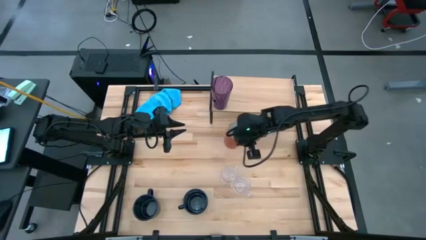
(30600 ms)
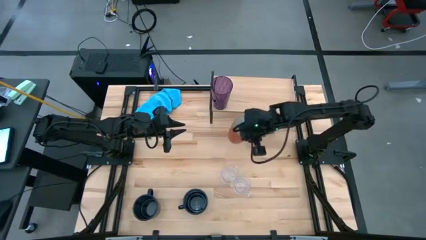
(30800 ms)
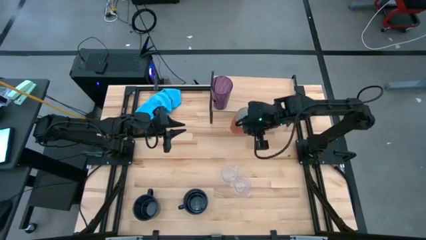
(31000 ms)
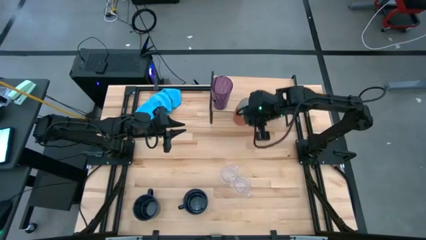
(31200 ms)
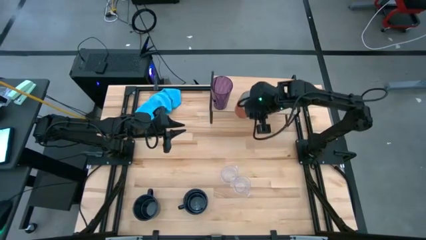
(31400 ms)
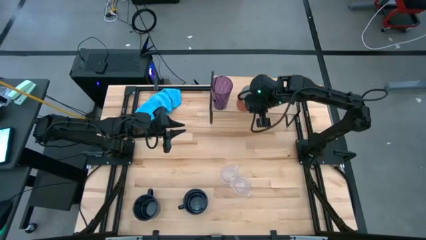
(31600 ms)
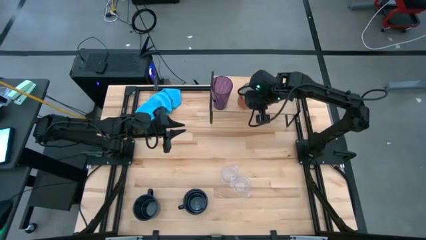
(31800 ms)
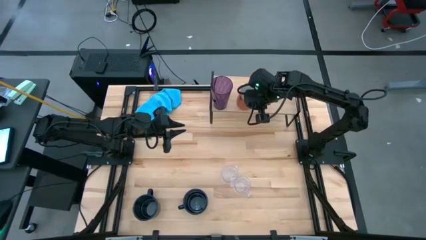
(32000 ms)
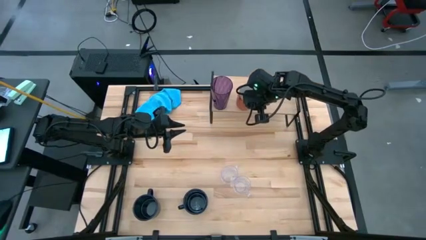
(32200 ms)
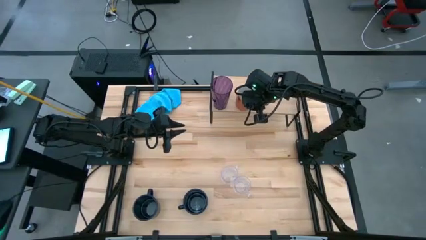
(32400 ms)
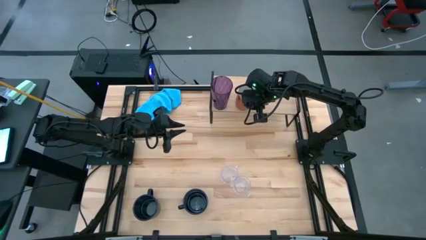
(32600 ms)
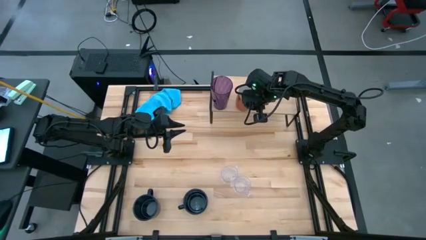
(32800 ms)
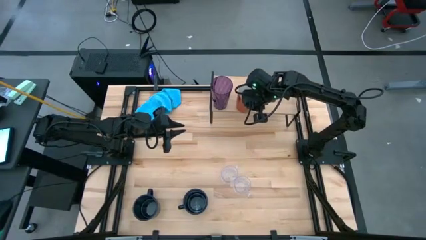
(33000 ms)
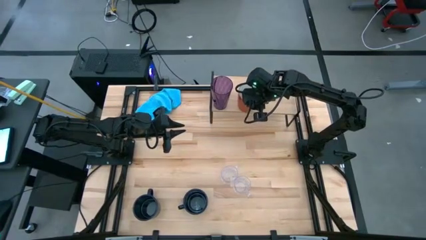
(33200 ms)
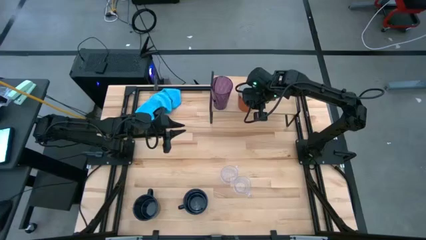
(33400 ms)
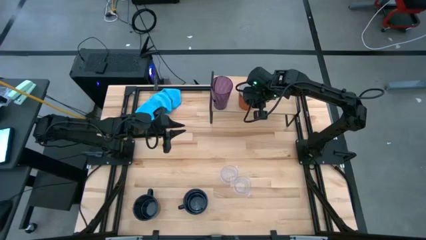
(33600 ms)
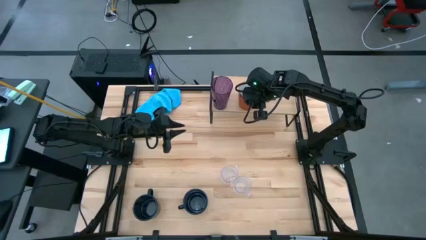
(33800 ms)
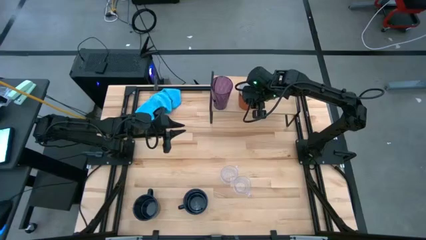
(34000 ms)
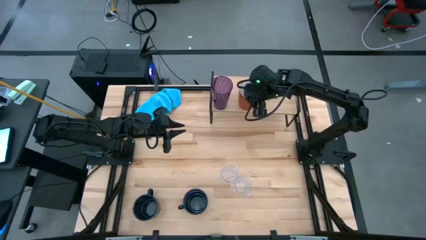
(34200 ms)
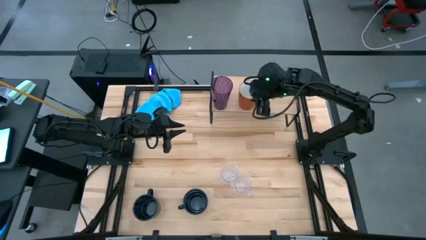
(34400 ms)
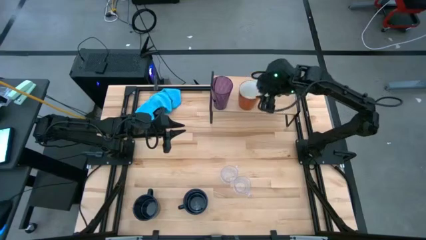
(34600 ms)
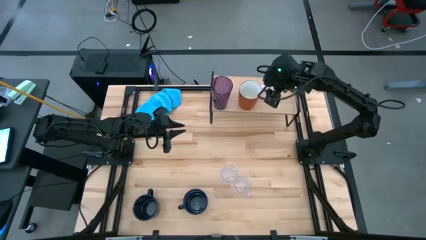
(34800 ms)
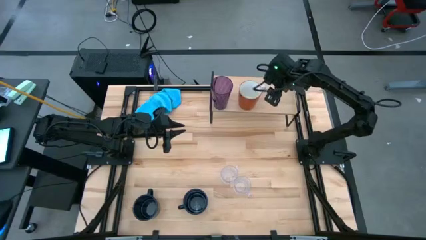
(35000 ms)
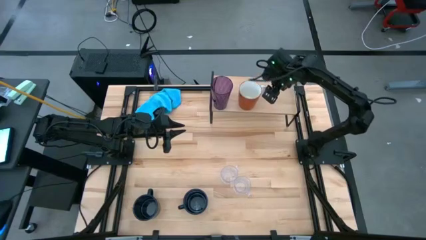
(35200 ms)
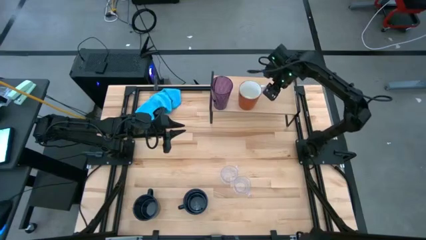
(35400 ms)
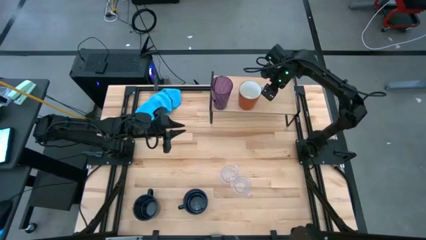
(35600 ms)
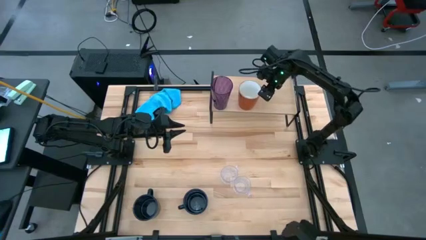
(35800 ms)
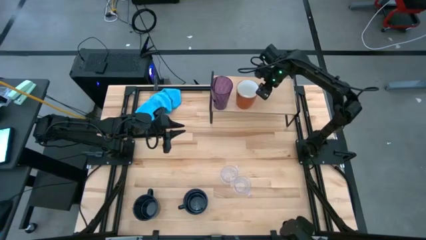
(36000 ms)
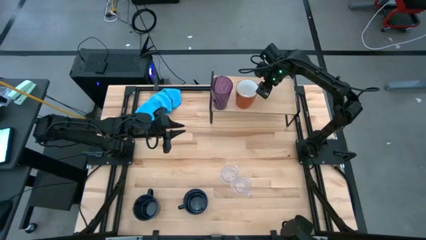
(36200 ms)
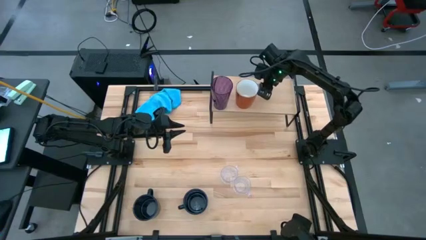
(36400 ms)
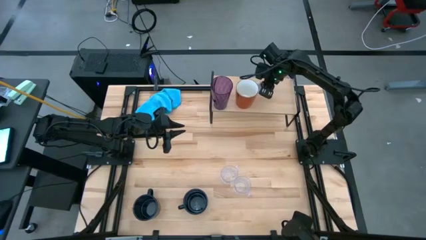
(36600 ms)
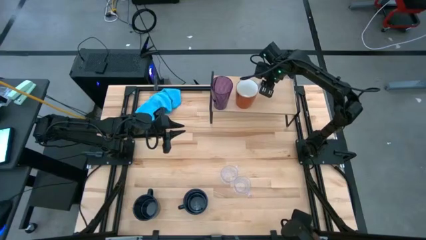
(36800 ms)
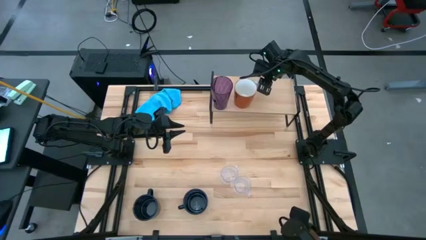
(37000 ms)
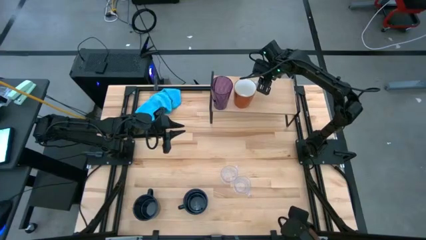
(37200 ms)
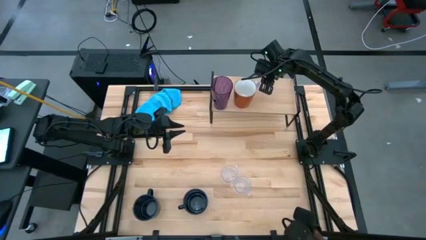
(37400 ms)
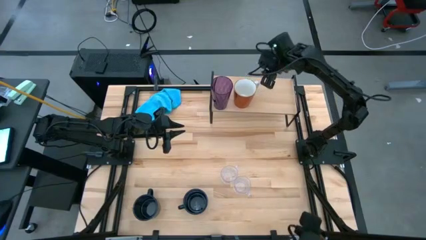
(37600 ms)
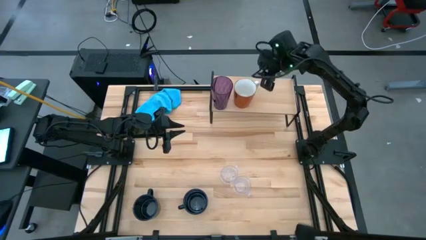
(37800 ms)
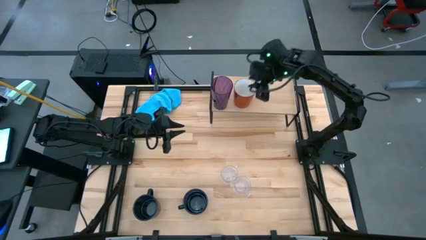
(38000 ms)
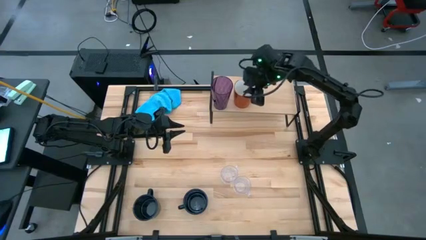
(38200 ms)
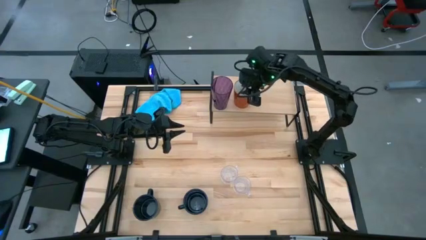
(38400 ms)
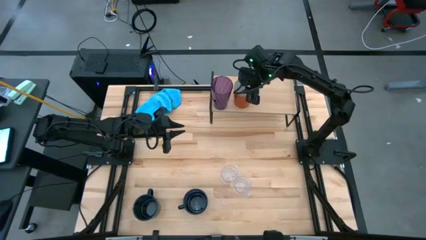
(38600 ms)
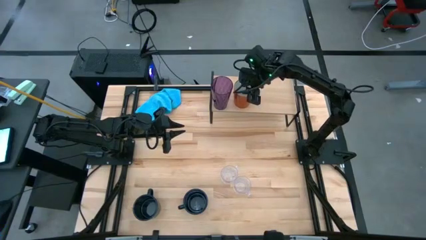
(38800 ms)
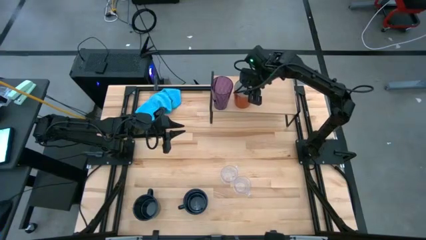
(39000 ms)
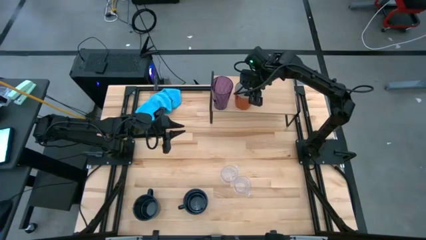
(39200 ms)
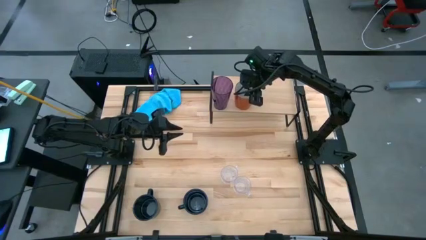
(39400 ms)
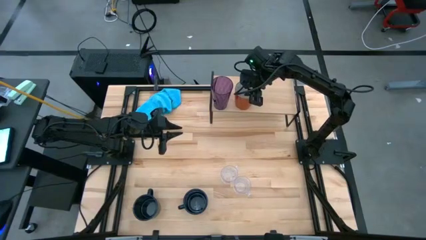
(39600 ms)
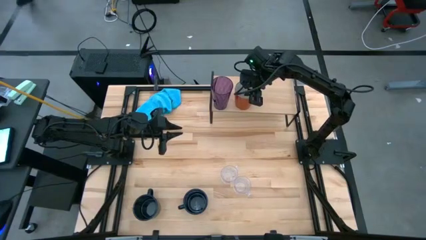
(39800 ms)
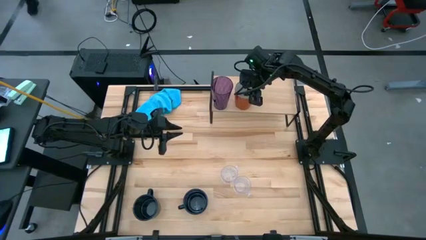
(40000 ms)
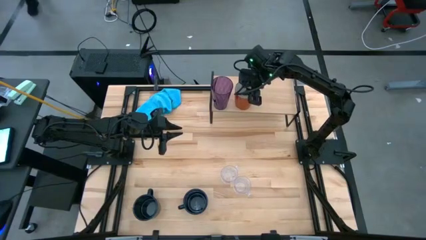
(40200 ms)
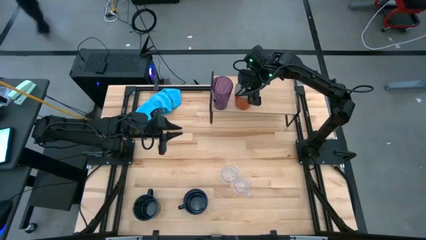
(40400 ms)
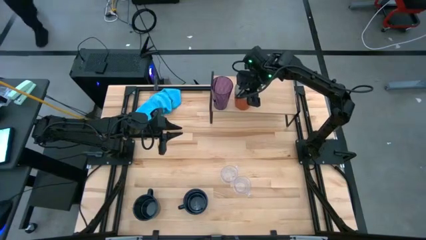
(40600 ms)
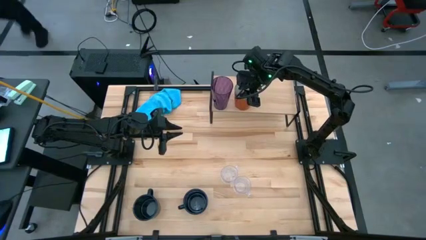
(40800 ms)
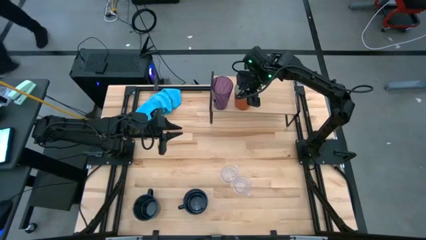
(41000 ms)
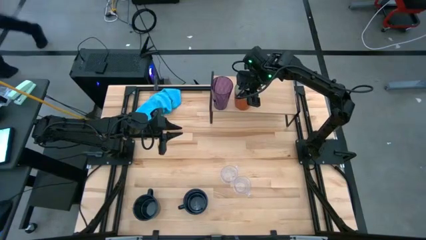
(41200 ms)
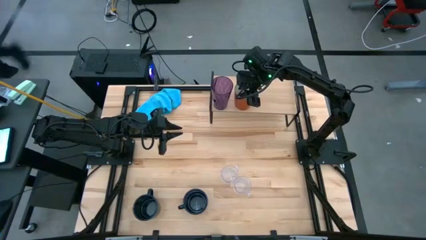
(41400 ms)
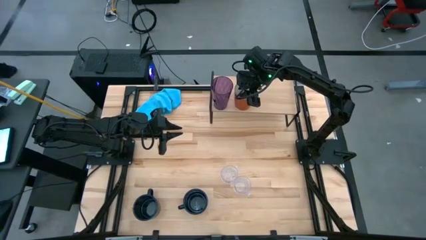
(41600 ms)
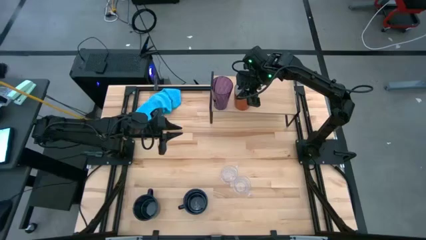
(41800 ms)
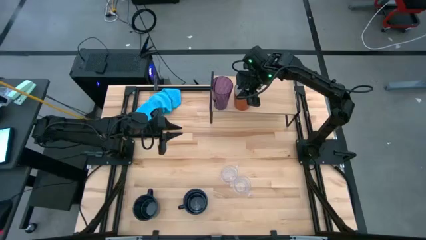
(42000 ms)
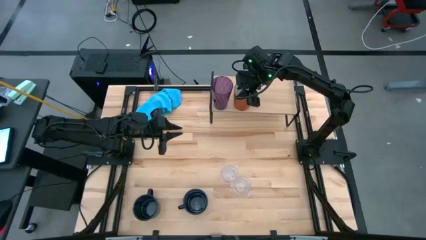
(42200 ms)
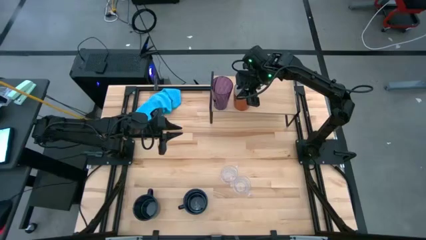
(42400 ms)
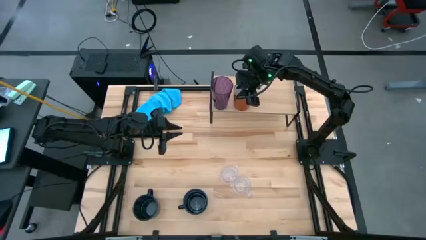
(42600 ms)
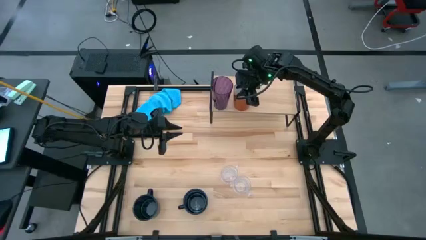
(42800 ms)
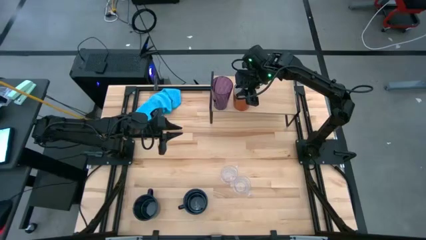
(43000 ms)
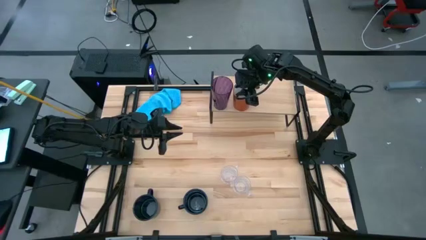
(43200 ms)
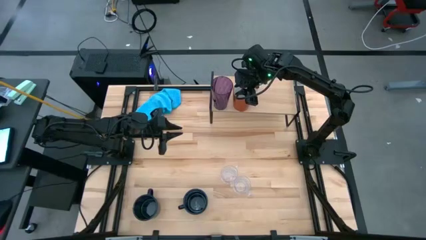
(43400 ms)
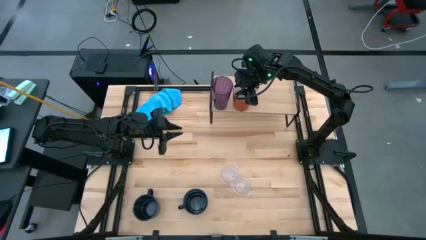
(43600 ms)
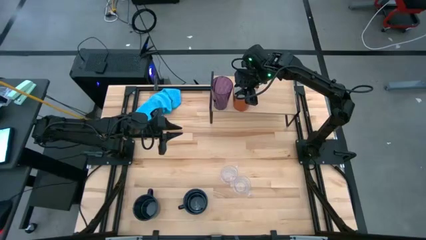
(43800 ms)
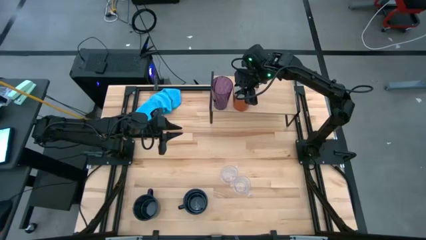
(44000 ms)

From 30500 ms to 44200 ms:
Task: Stack small to large cups/mugs on shelf
Put the brown mug on the shelf
